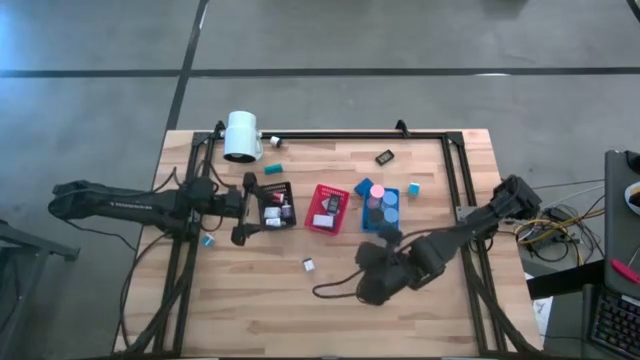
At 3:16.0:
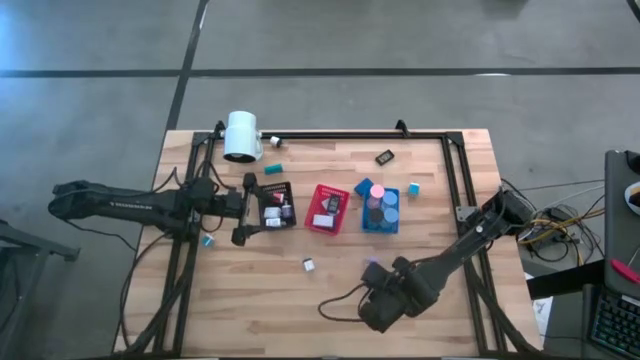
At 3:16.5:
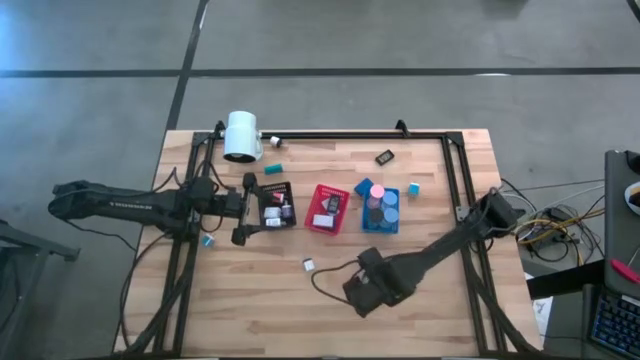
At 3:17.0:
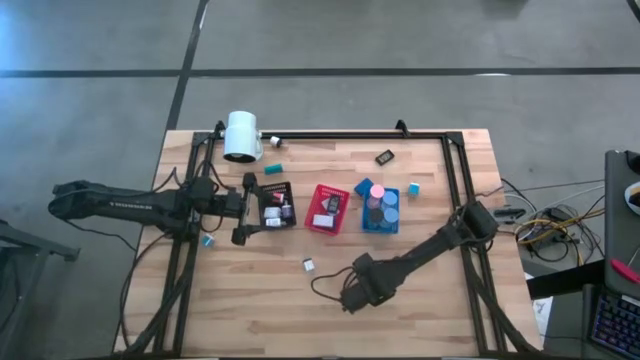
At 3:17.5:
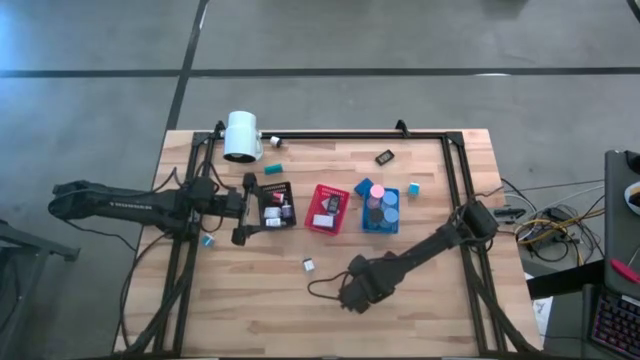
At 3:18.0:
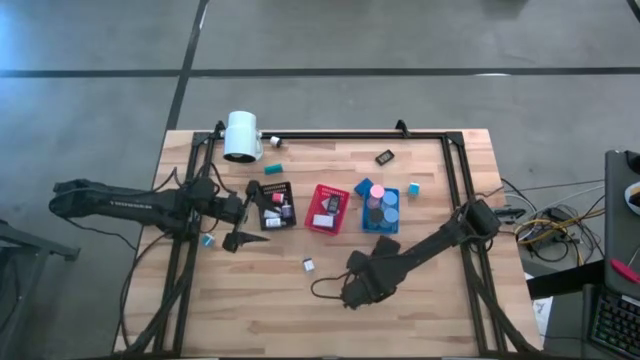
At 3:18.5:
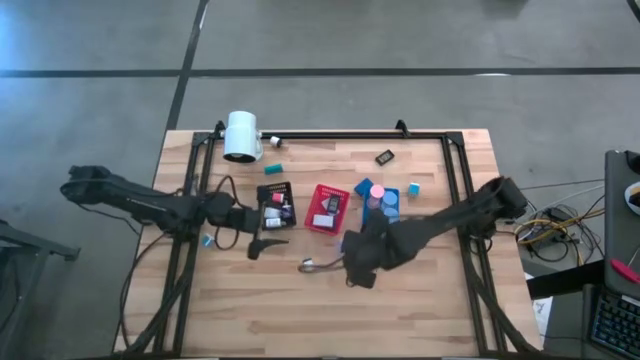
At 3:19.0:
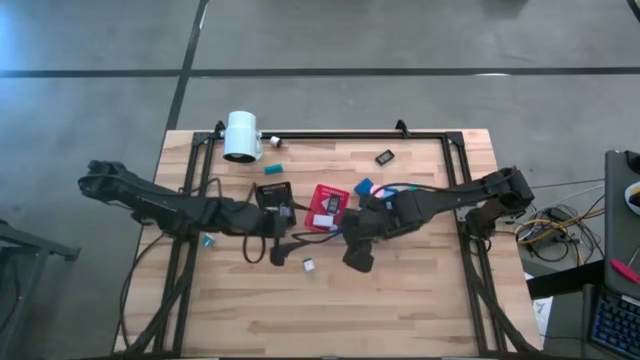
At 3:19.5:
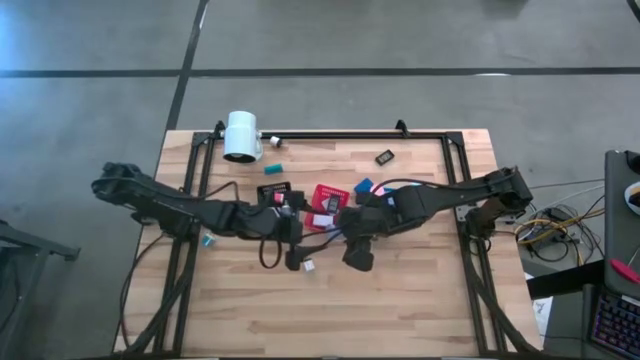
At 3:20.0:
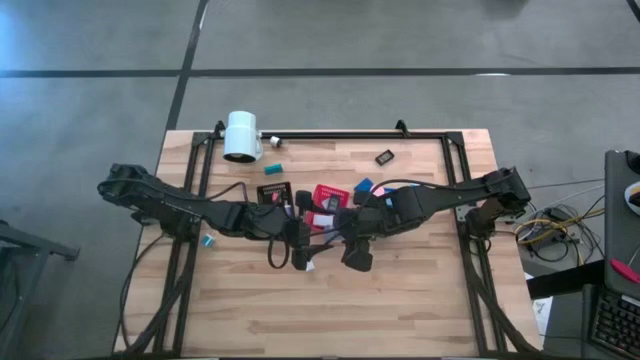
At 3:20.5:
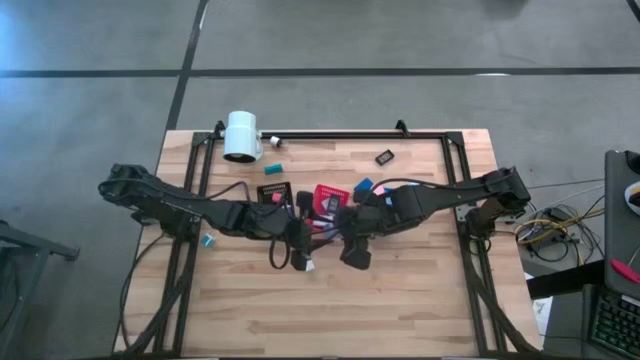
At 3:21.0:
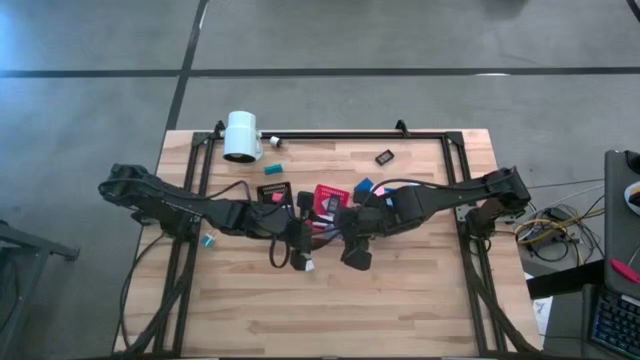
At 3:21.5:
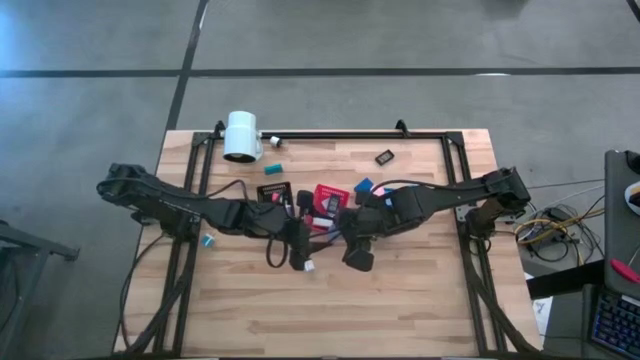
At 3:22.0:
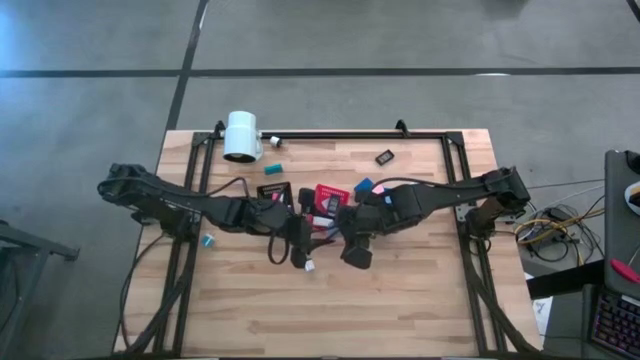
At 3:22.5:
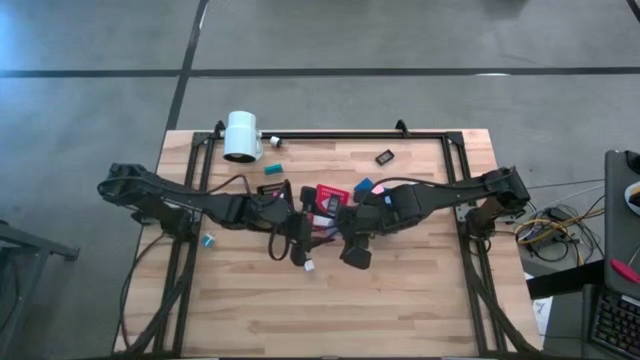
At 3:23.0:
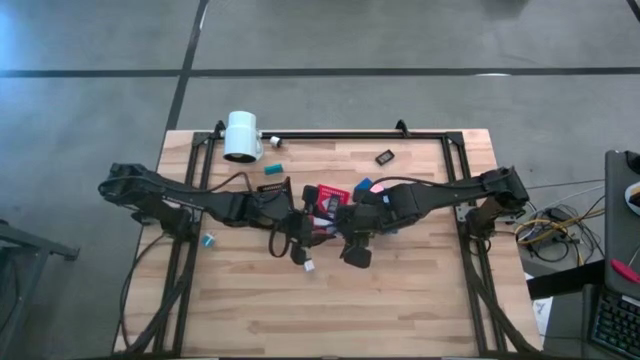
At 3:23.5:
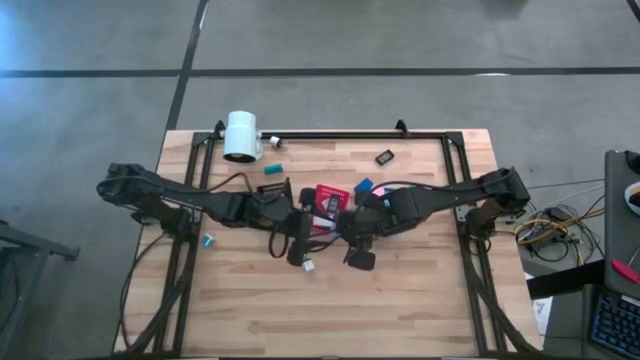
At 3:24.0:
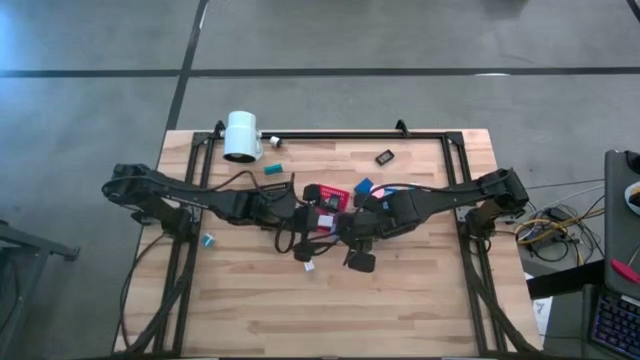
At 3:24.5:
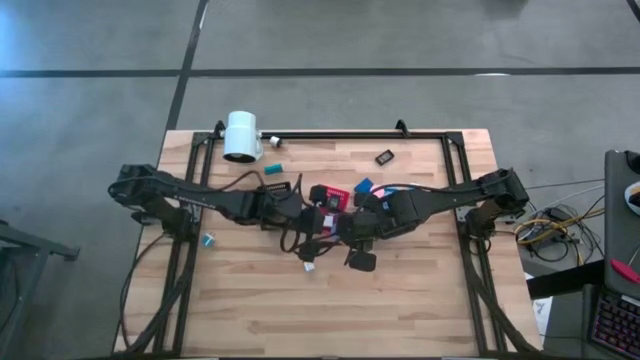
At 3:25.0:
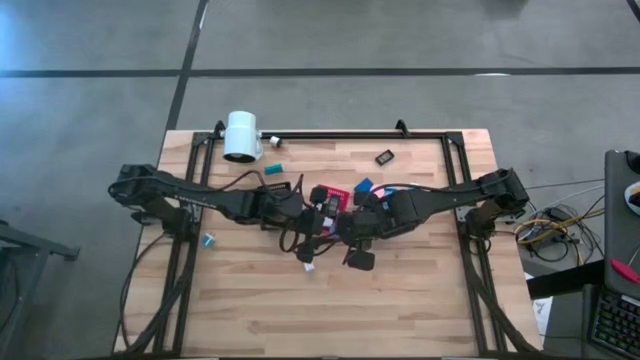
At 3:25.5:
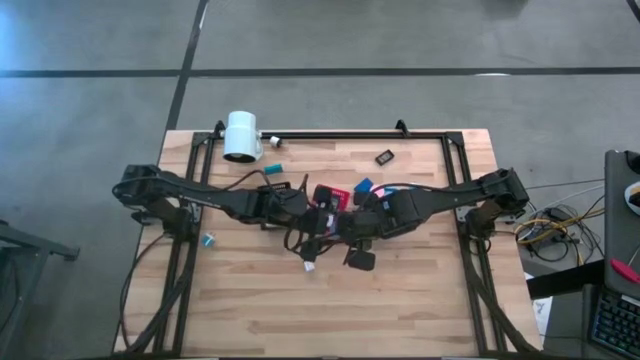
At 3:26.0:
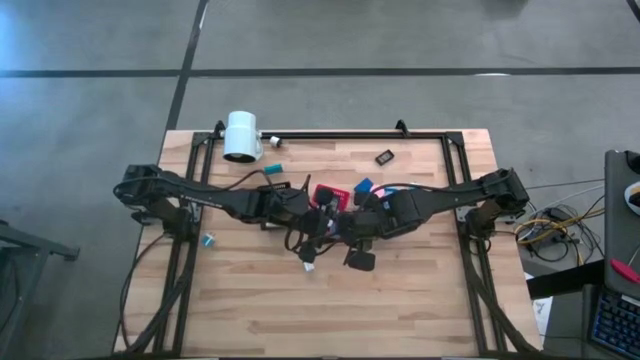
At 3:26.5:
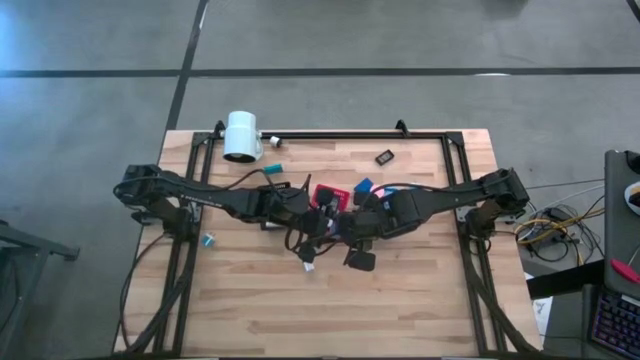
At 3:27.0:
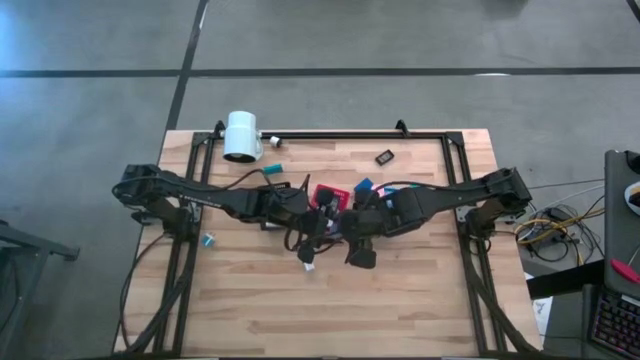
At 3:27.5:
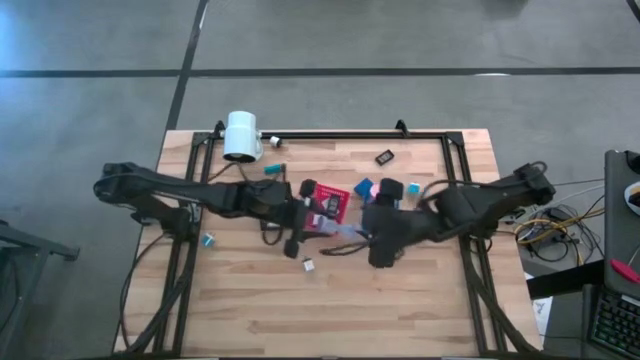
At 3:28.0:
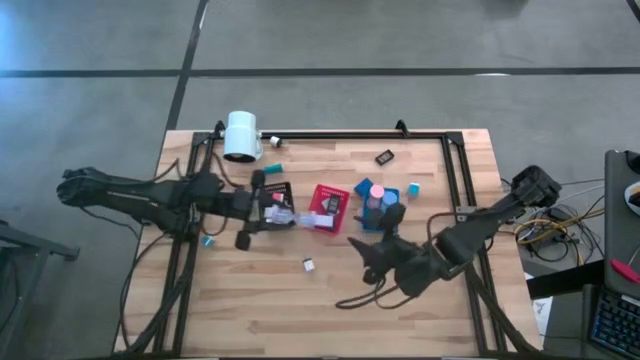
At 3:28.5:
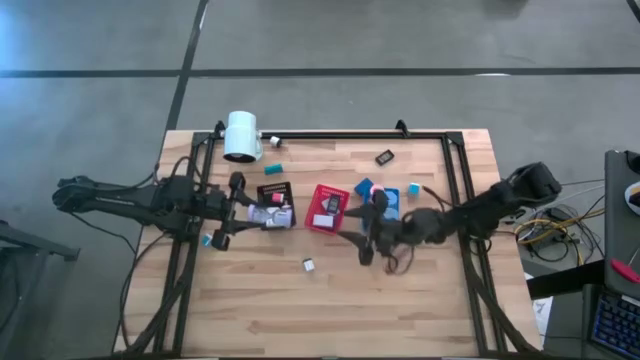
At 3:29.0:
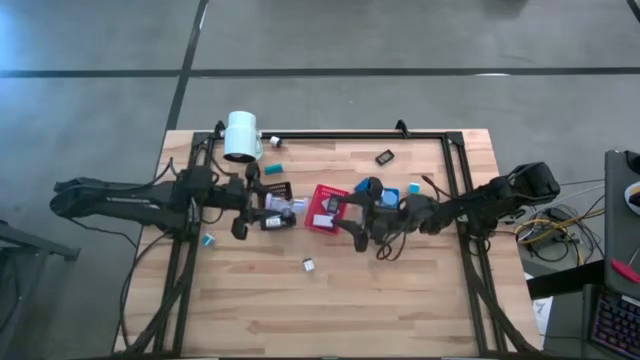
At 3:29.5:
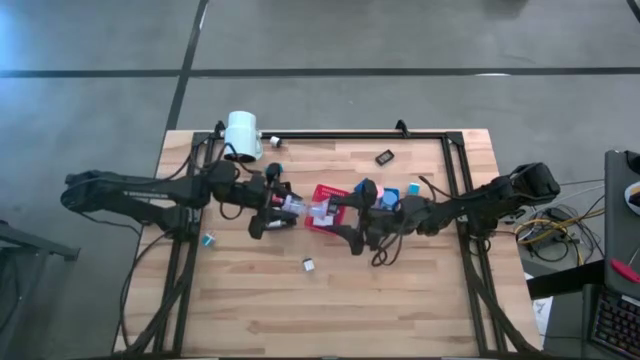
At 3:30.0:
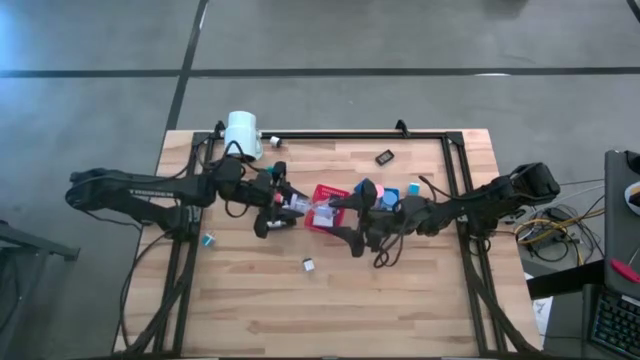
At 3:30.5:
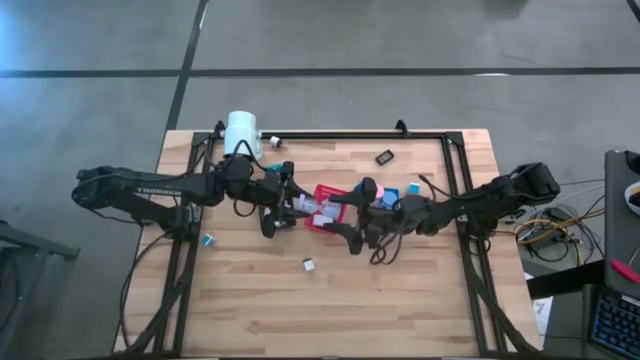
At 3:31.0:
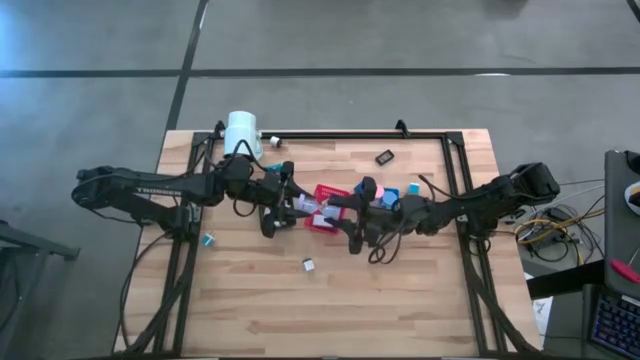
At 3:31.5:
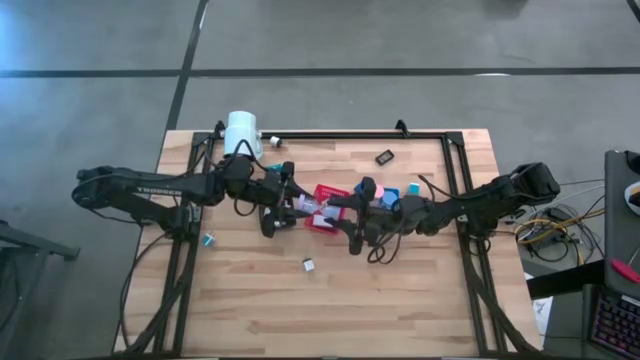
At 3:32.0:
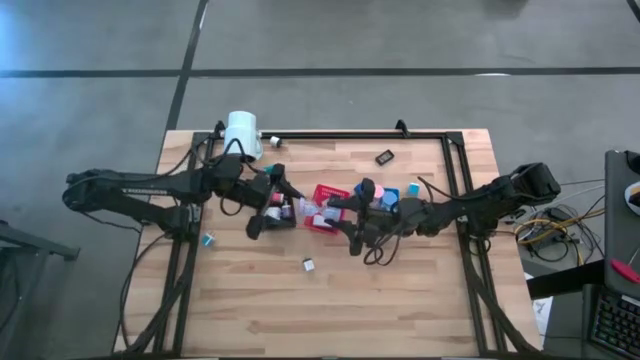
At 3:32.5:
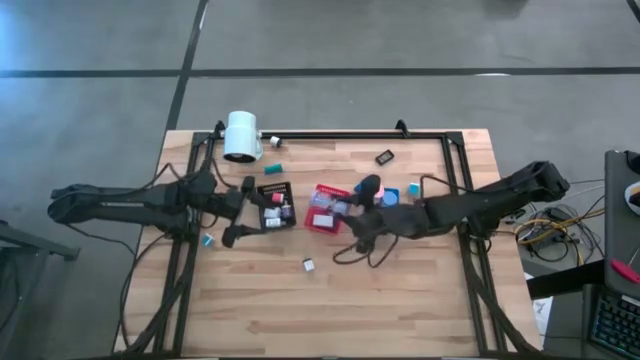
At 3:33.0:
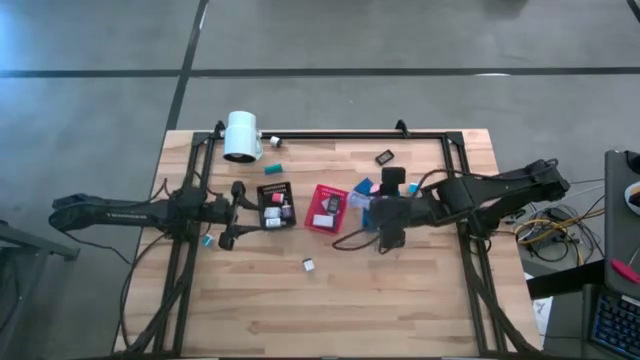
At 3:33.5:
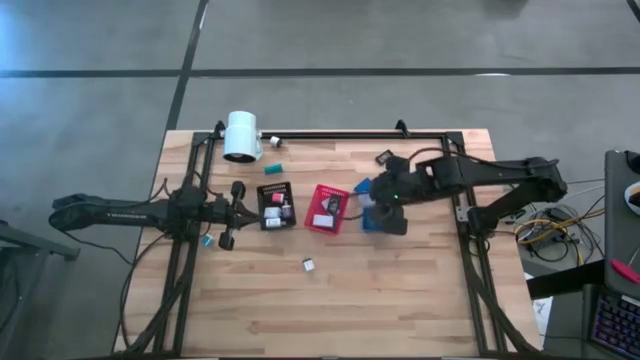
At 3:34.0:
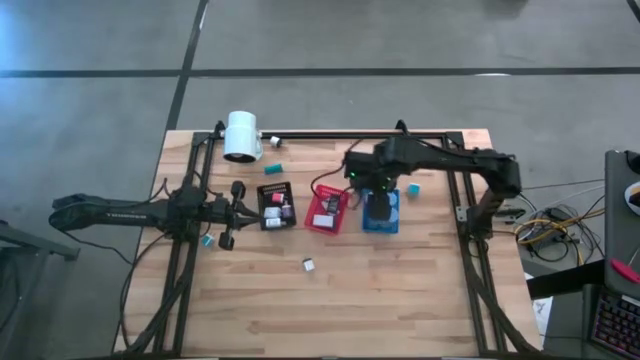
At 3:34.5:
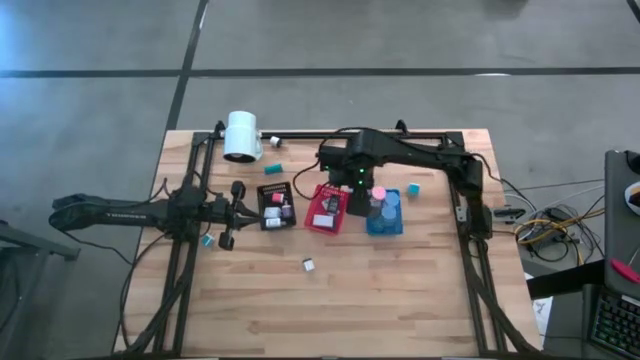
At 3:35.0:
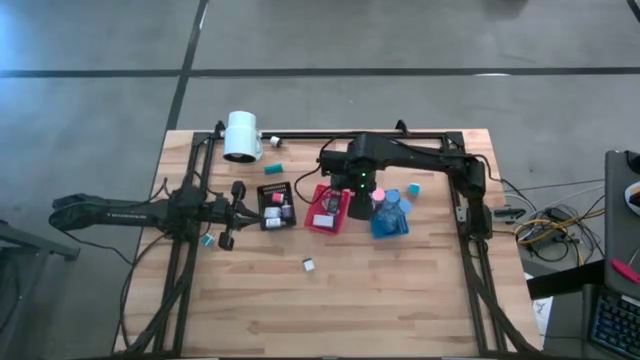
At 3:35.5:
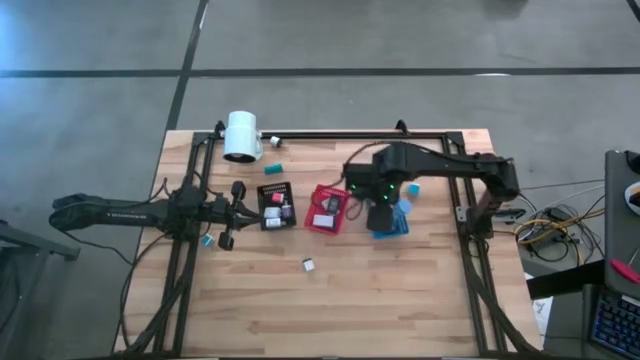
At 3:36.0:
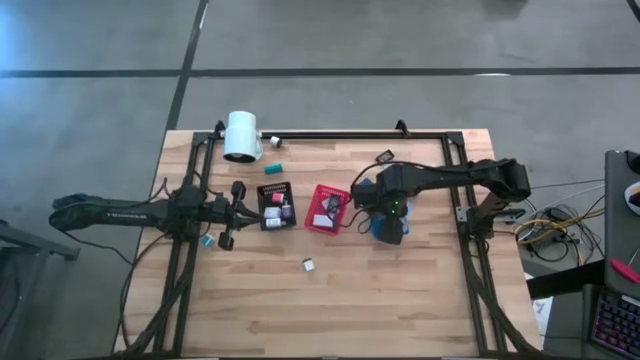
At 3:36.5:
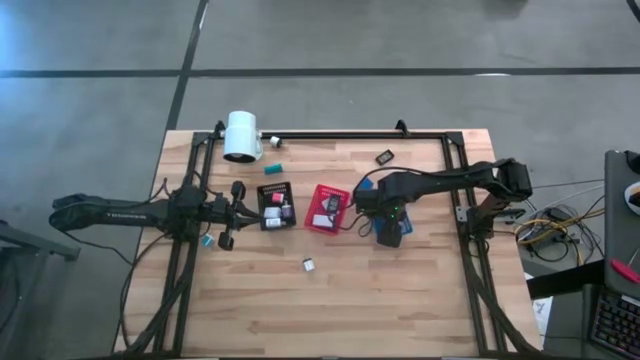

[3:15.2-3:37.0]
Task: Pick & Place Office items
Put the purple hourglass into the blue bin
